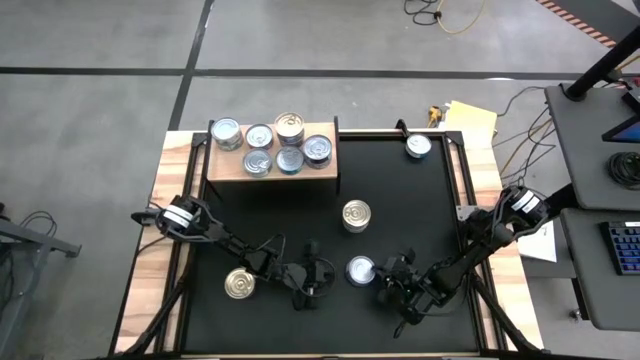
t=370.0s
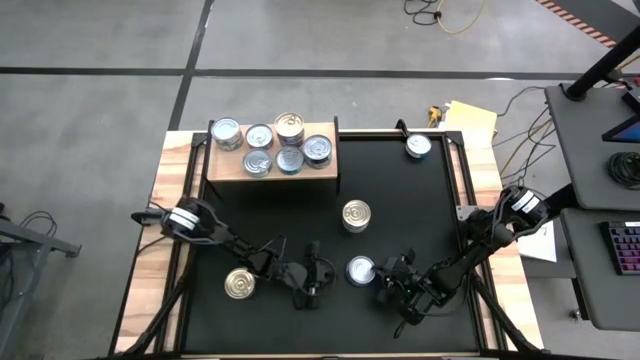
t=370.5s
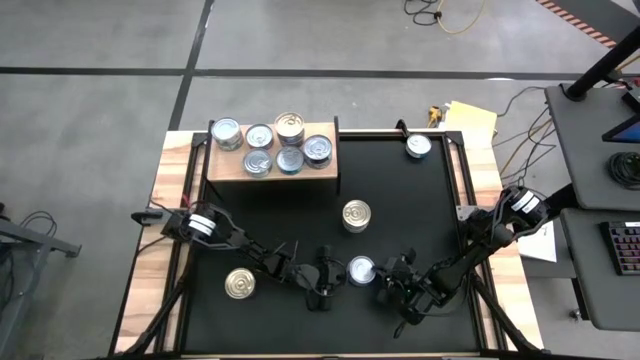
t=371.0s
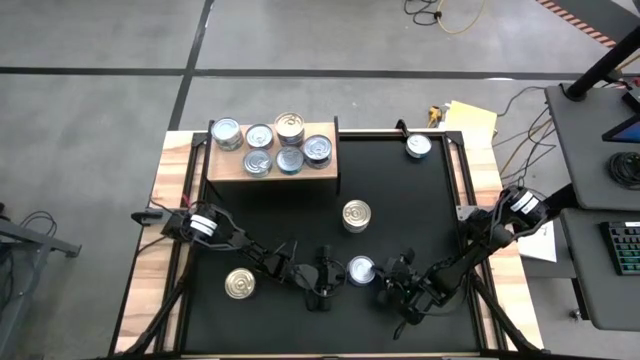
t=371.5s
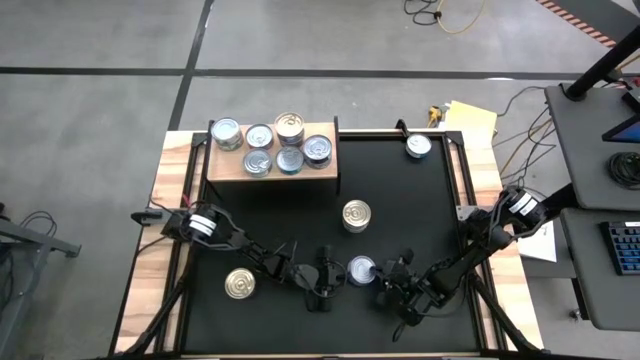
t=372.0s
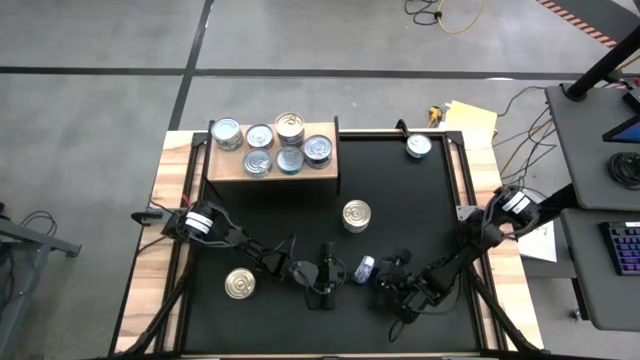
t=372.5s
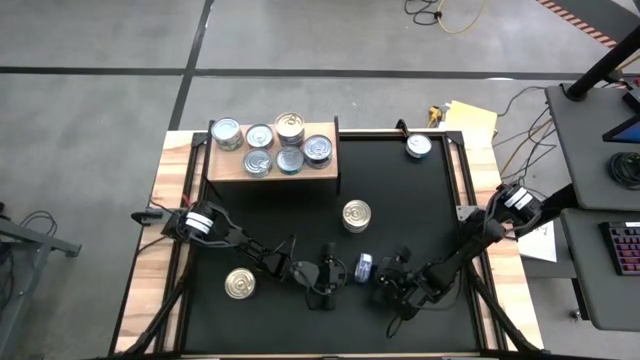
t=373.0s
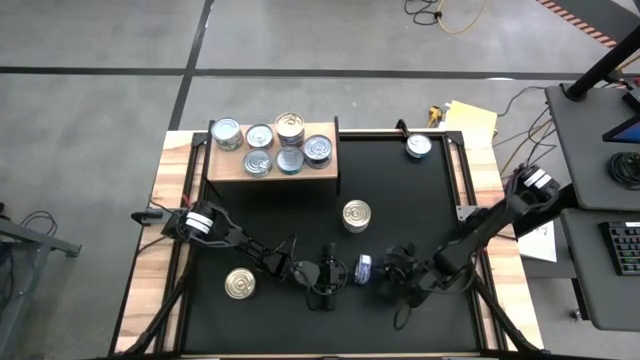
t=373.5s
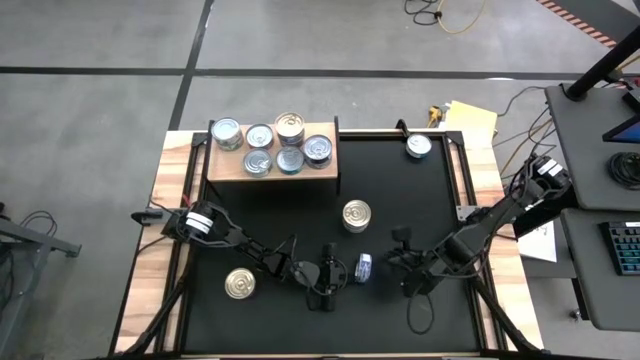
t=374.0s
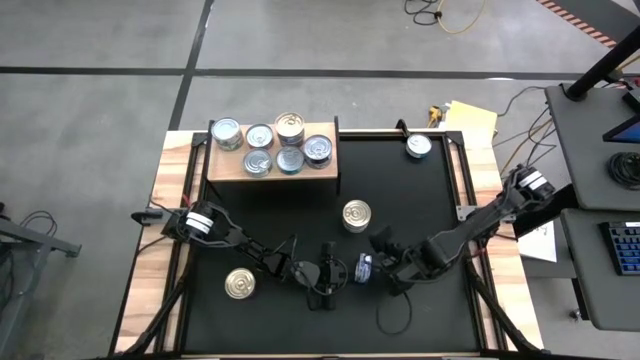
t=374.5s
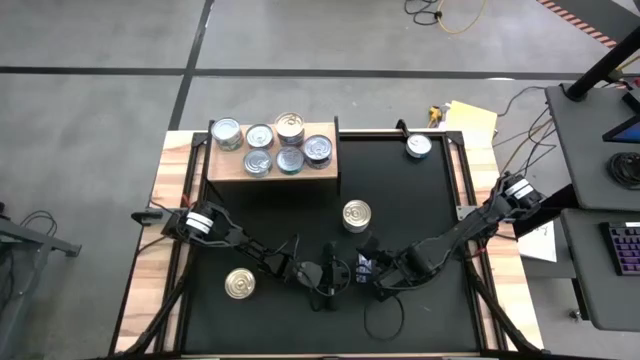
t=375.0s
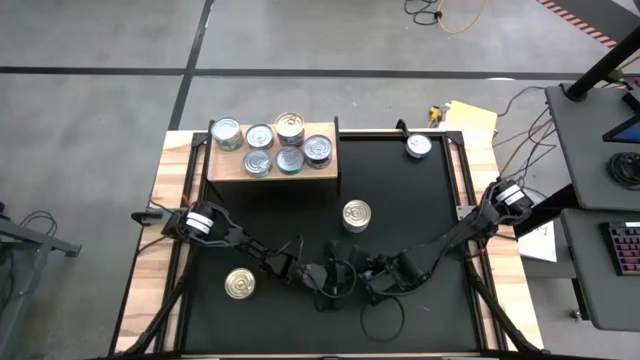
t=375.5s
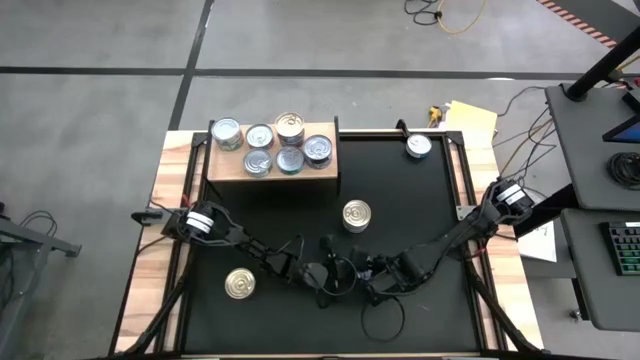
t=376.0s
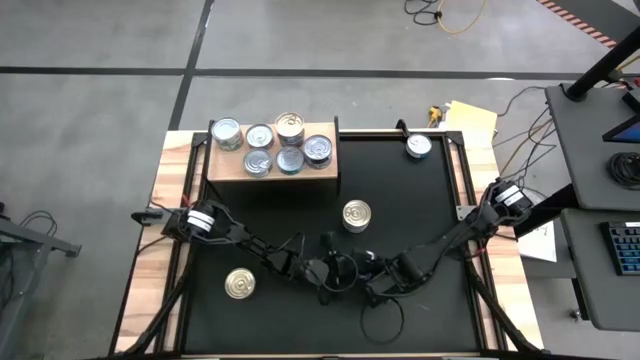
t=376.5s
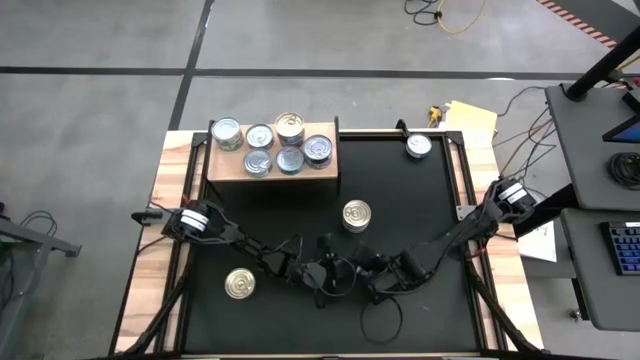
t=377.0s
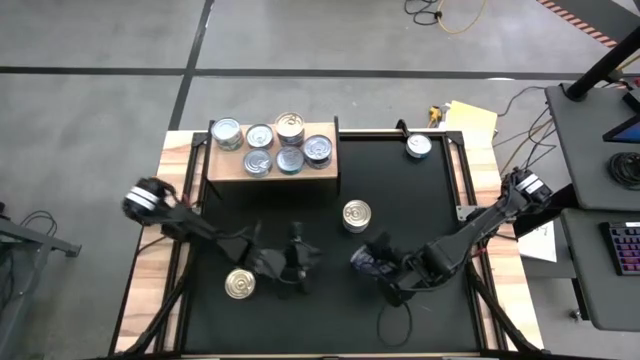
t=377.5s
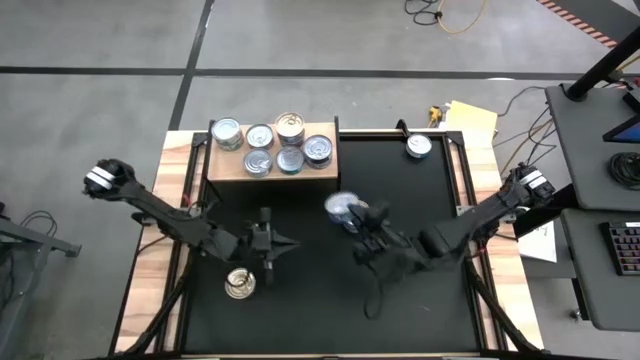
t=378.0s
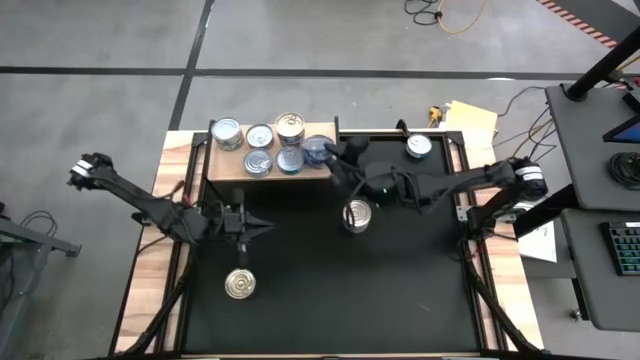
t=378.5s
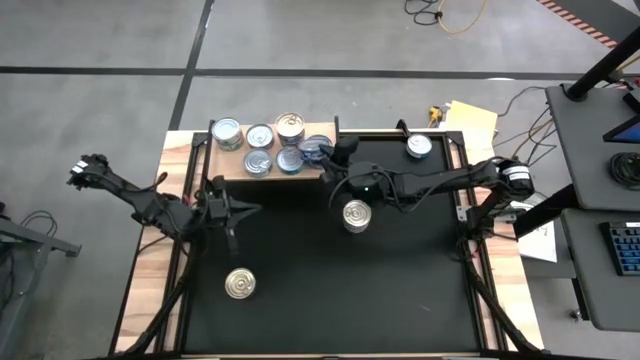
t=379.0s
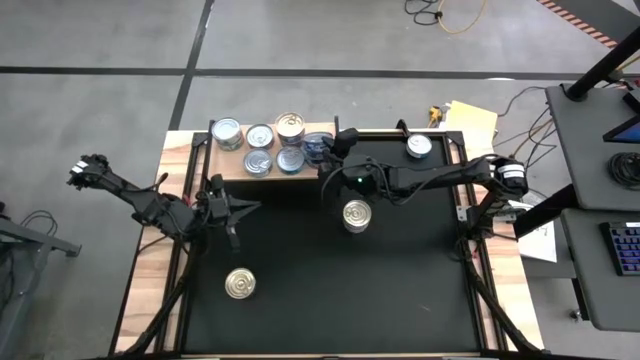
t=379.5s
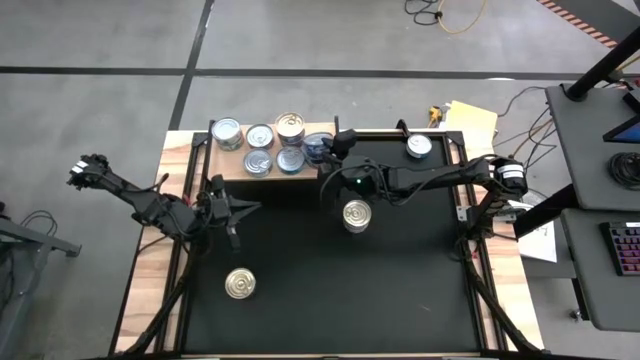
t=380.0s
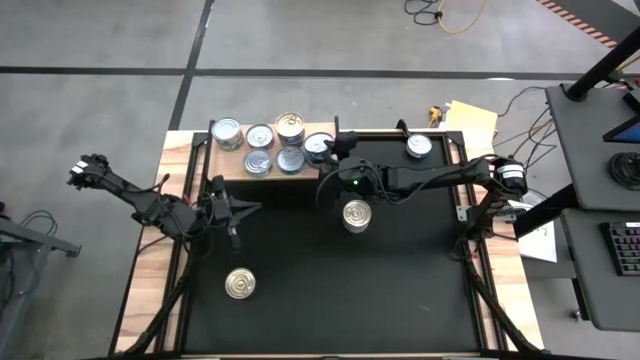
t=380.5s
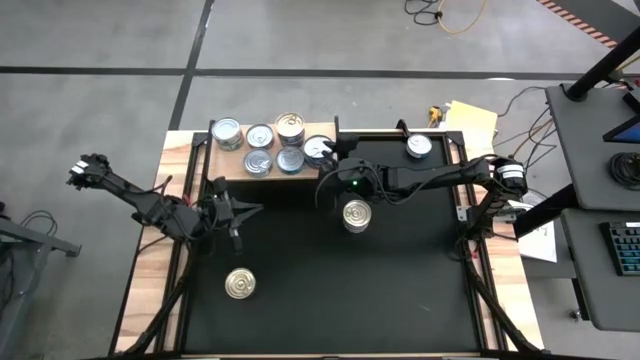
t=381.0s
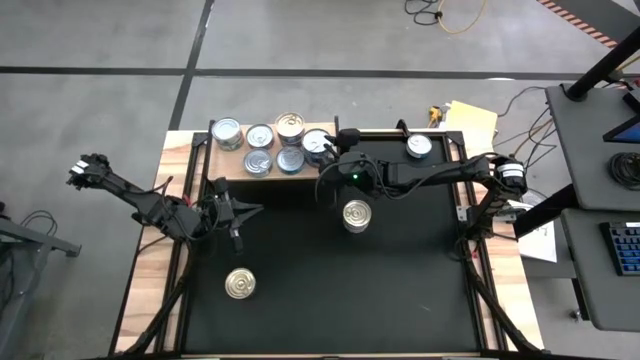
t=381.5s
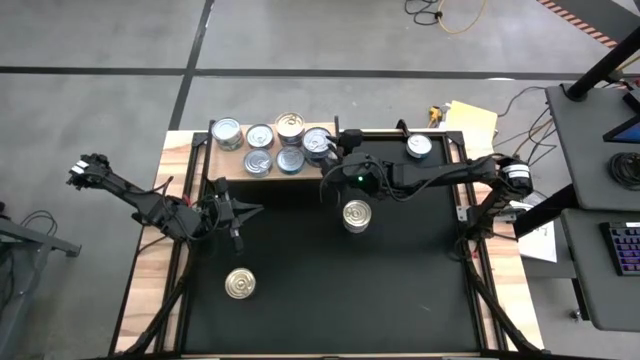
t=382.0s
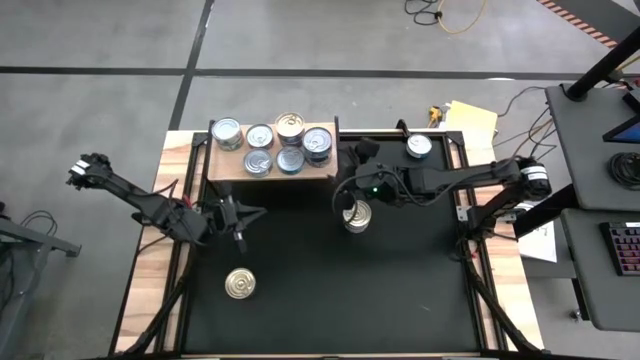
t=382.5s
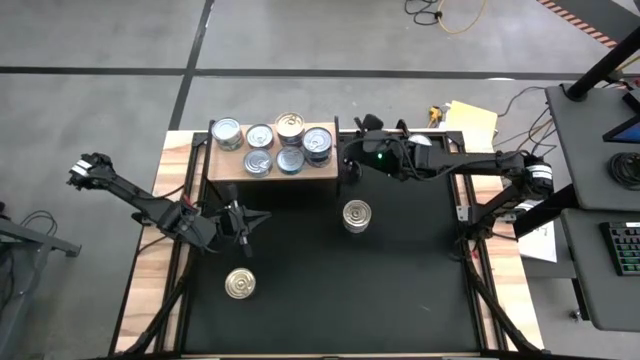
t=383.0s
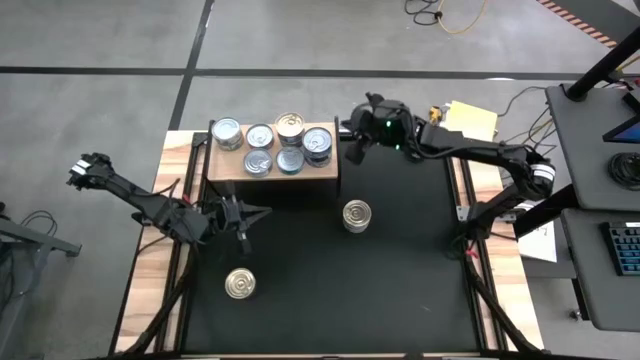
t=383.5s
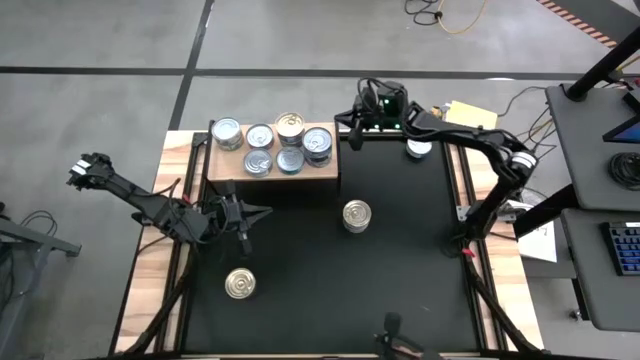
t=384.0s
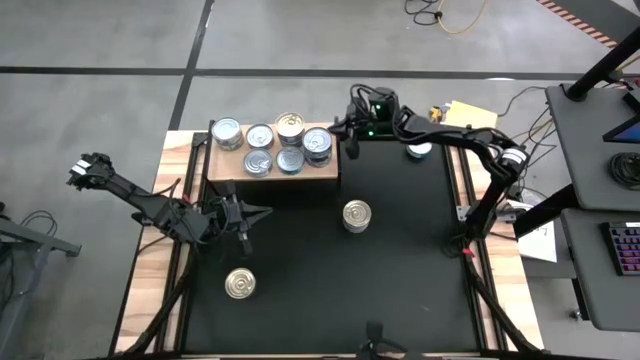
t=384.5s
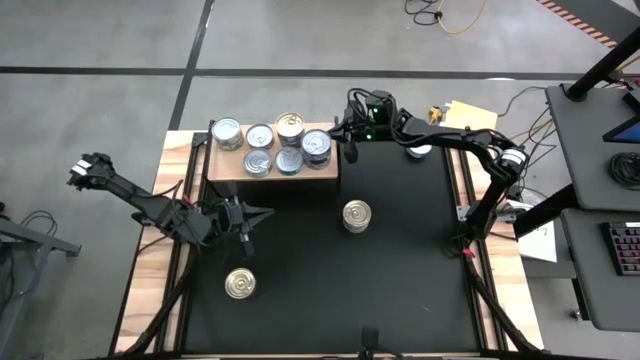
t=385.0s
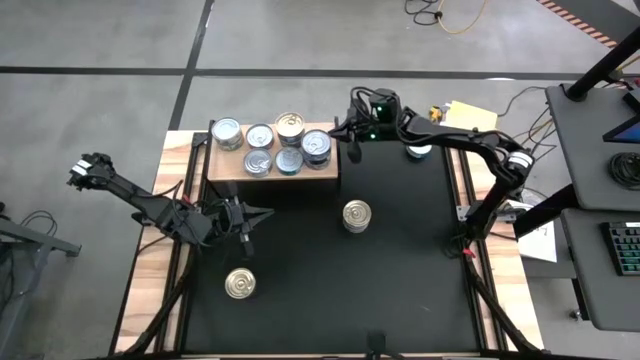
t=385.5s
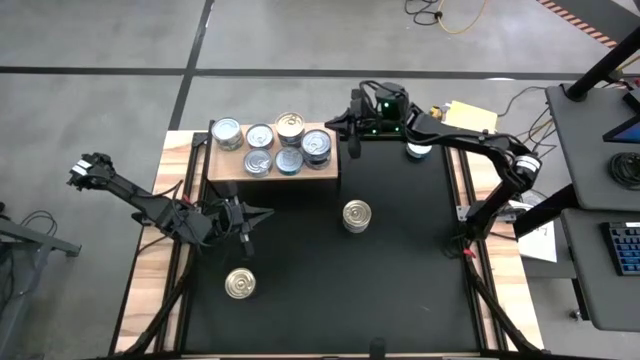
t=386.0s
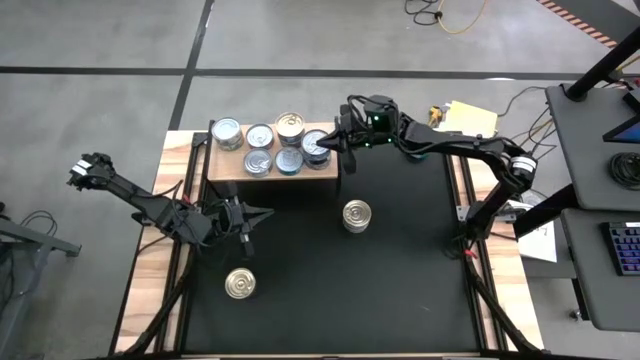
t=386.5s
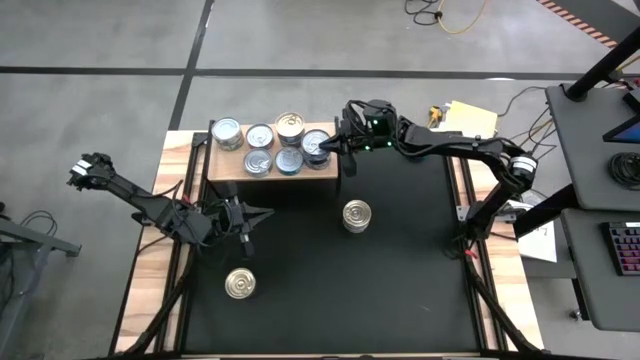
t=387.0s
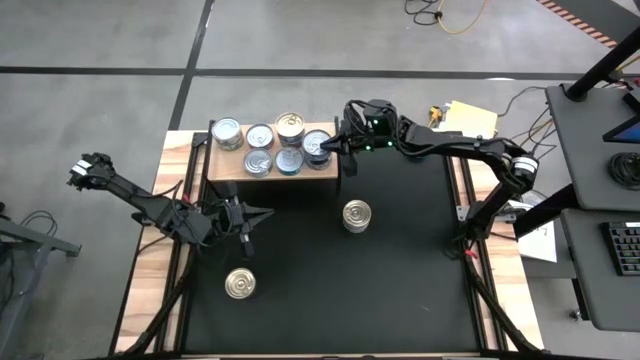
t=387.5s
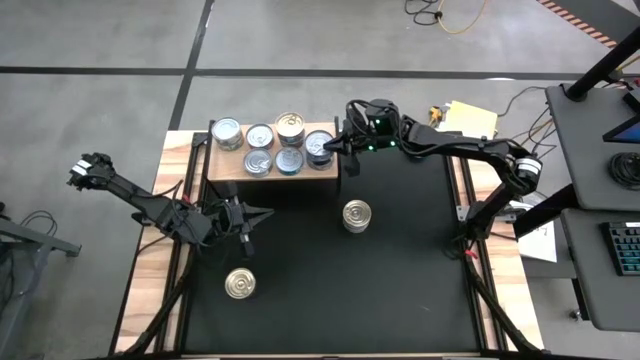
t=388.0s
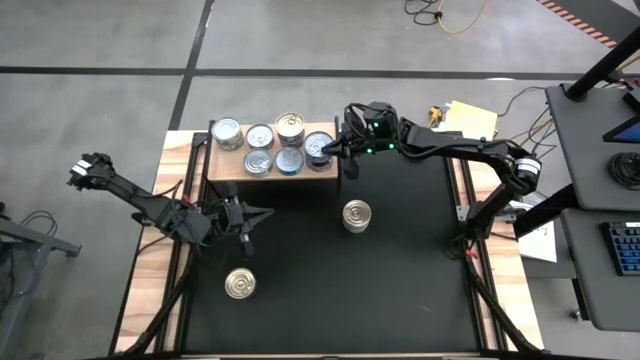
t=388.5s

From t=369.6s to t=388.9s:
Task: Stack canned seafood by type on shelf
Stack the blue tuna can on top of the blue tuna can on the shelf

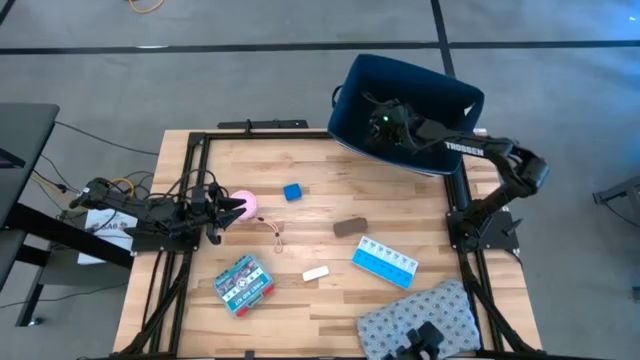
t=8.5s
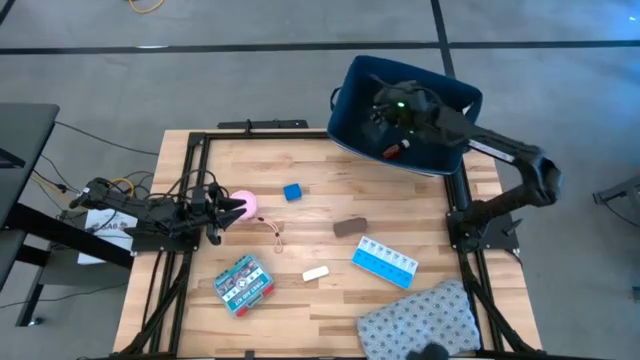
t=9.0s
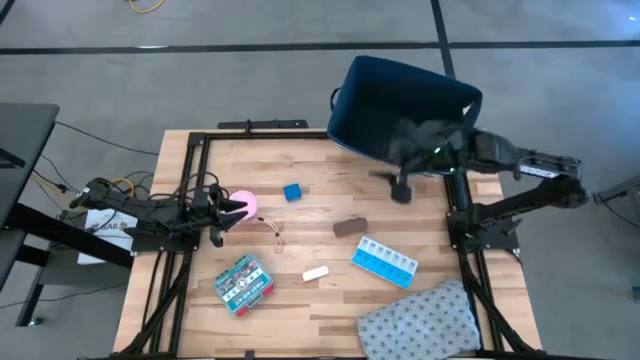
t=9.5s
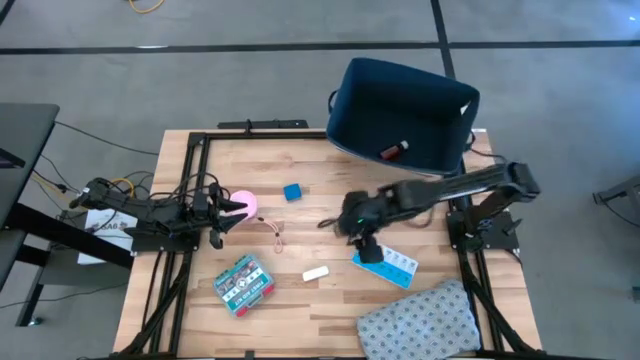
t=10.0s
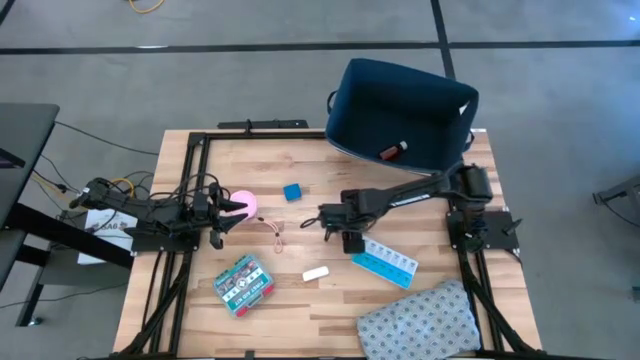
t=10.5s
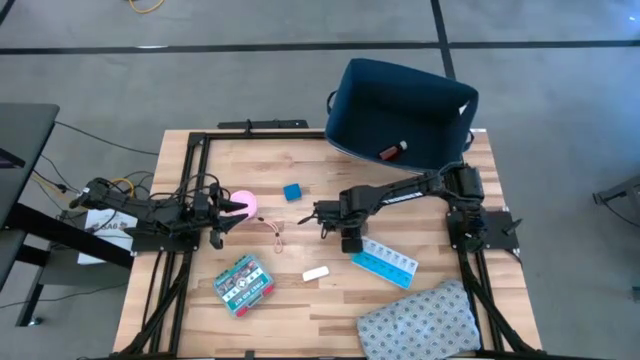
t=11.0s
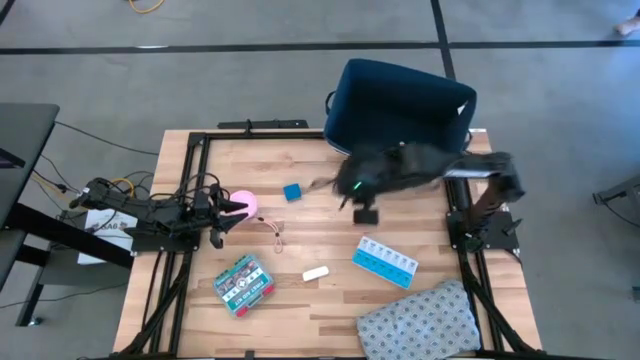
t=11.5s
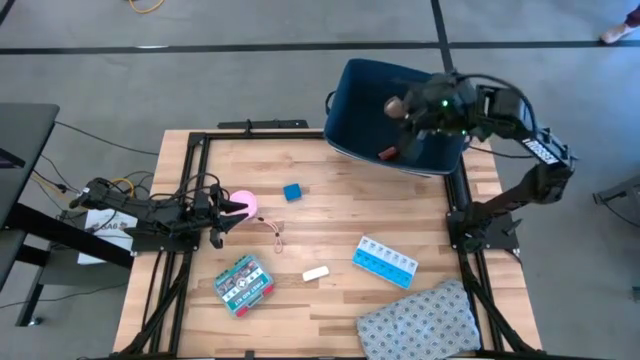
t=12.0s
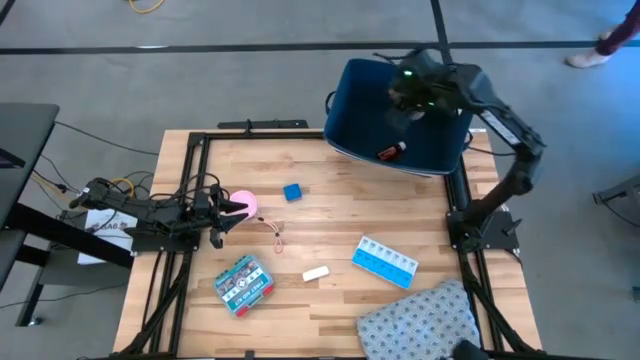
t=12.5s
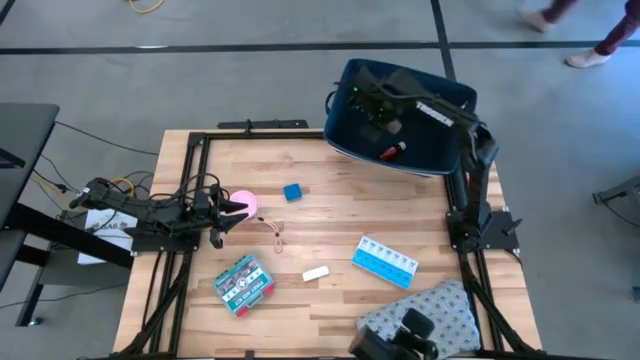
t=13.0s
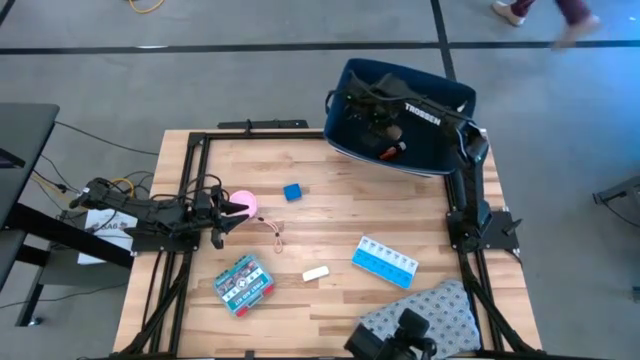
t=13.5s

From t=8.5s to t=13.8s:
Task: Pick & place medical supplies in basket/bin
Put the brown bandage into the blue bin
